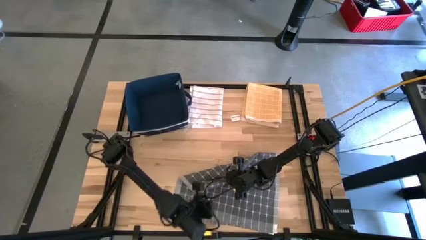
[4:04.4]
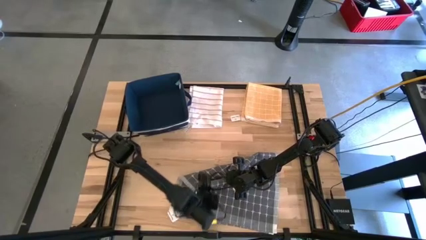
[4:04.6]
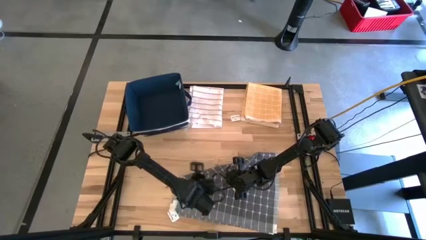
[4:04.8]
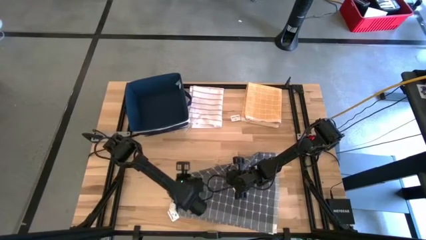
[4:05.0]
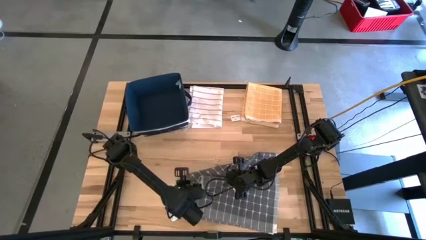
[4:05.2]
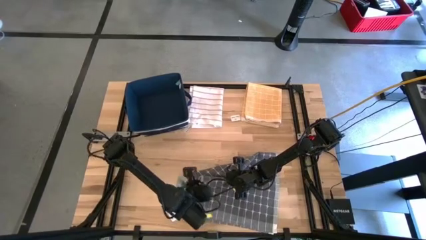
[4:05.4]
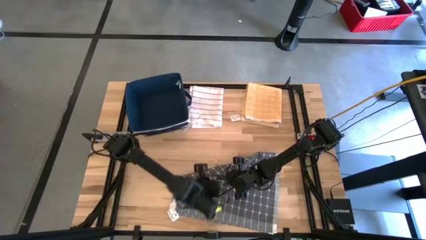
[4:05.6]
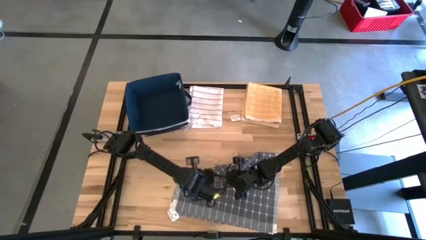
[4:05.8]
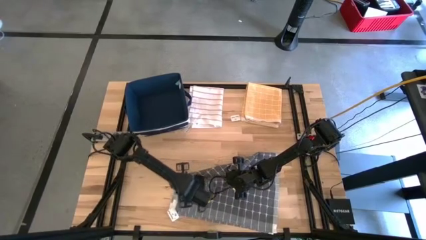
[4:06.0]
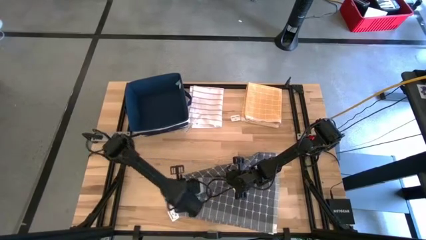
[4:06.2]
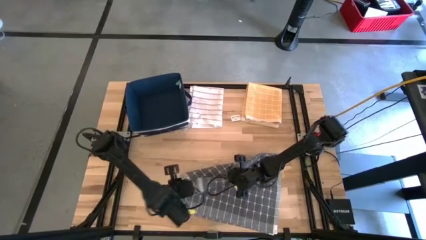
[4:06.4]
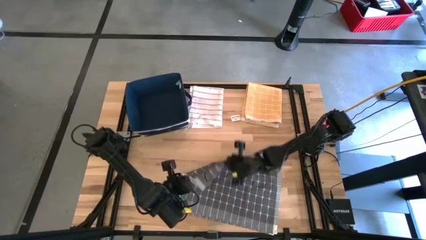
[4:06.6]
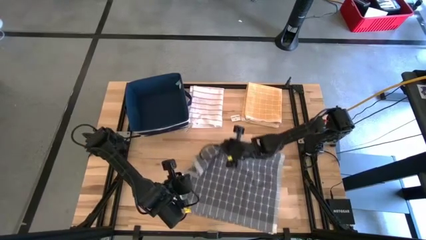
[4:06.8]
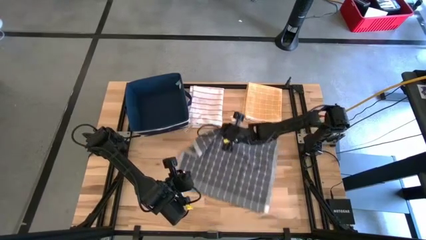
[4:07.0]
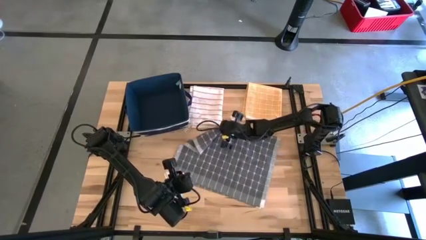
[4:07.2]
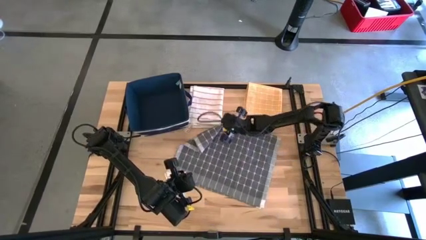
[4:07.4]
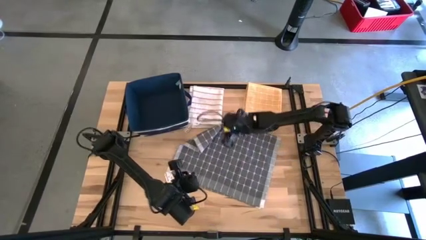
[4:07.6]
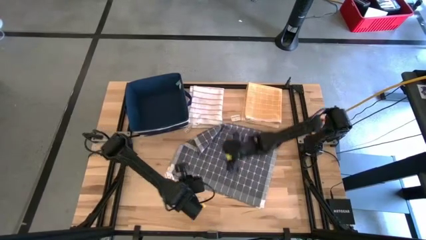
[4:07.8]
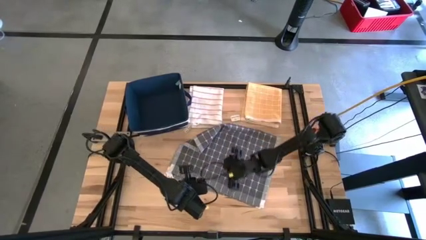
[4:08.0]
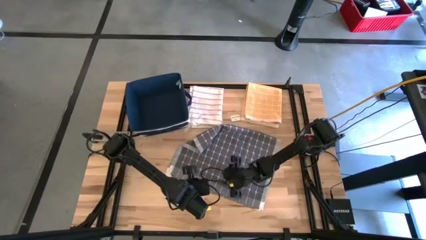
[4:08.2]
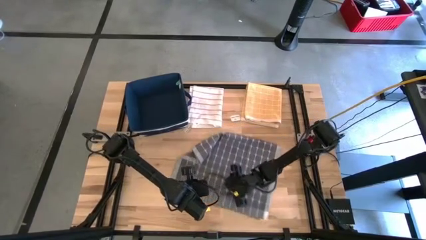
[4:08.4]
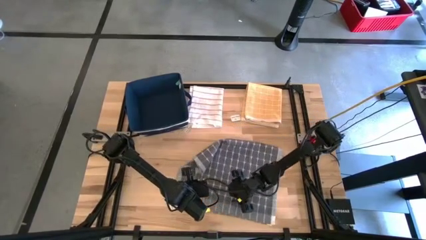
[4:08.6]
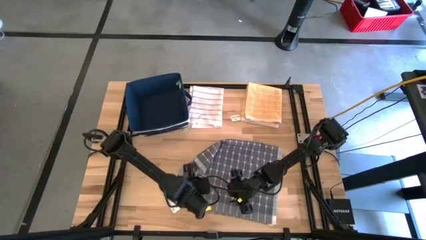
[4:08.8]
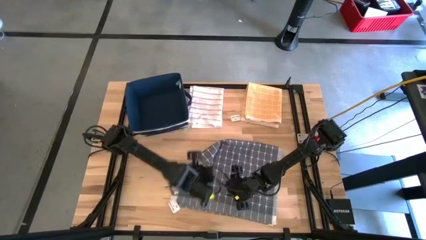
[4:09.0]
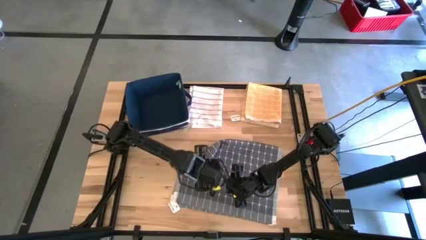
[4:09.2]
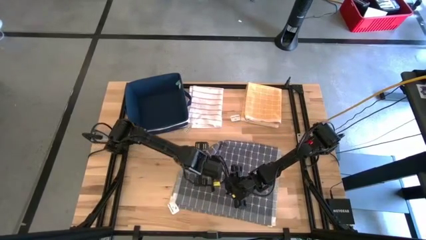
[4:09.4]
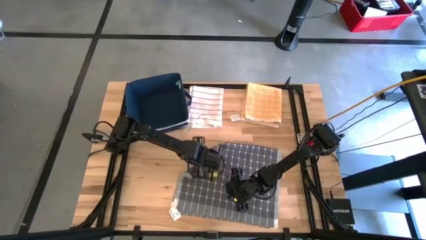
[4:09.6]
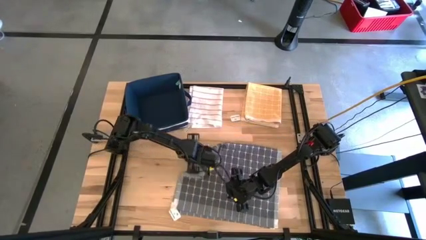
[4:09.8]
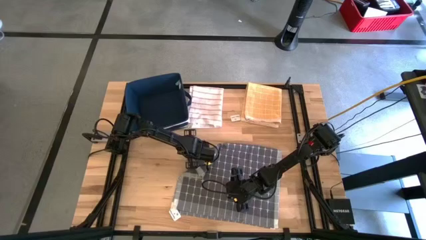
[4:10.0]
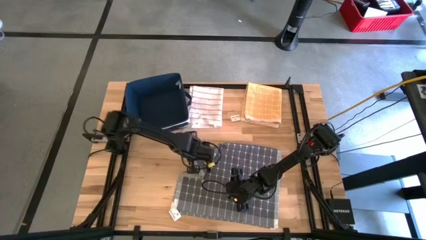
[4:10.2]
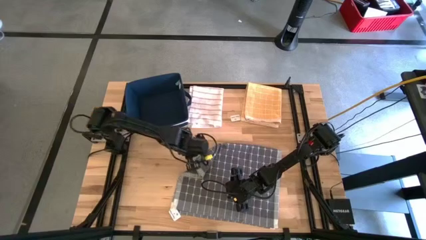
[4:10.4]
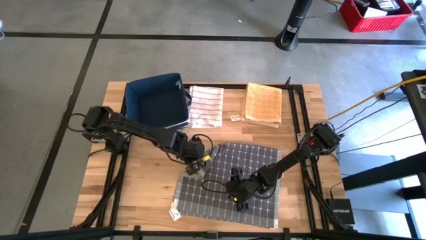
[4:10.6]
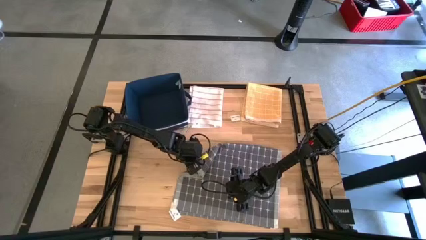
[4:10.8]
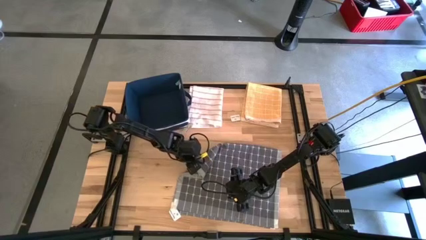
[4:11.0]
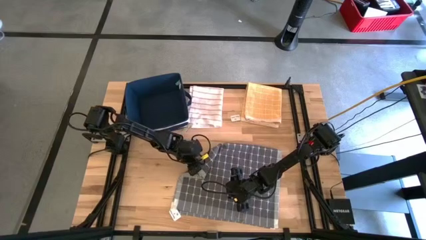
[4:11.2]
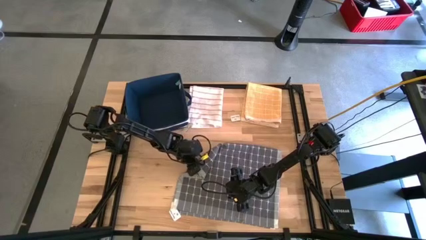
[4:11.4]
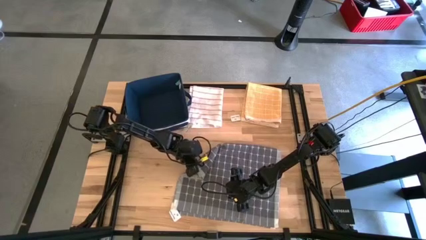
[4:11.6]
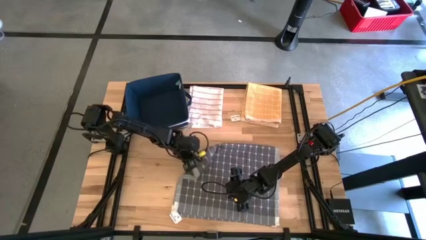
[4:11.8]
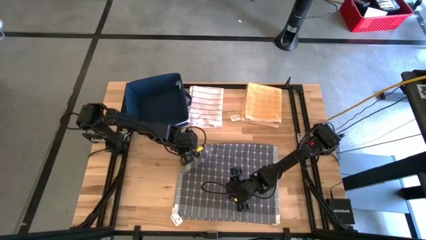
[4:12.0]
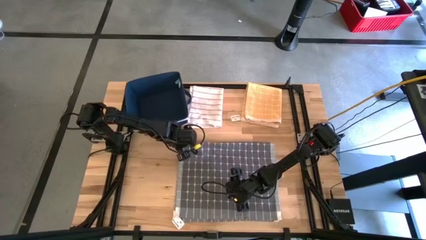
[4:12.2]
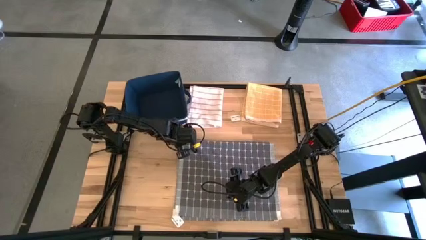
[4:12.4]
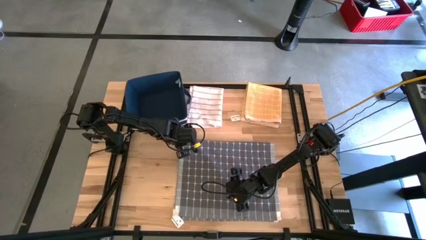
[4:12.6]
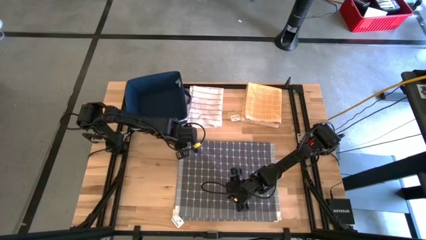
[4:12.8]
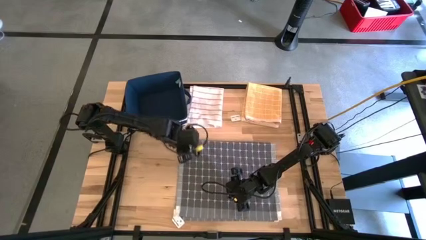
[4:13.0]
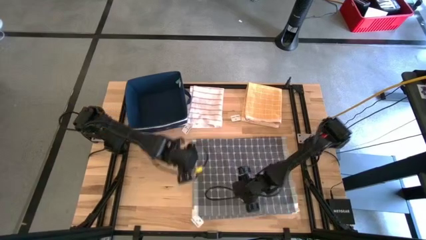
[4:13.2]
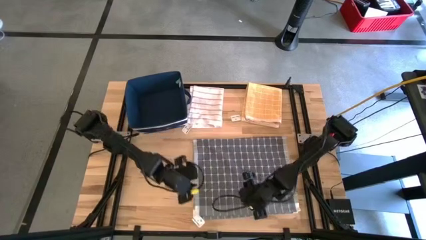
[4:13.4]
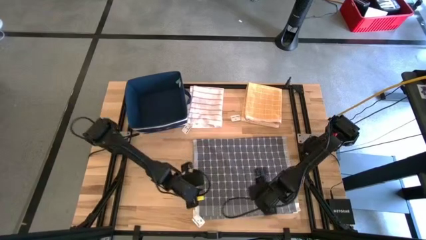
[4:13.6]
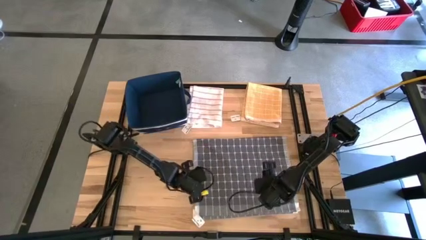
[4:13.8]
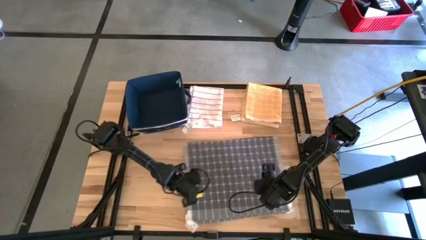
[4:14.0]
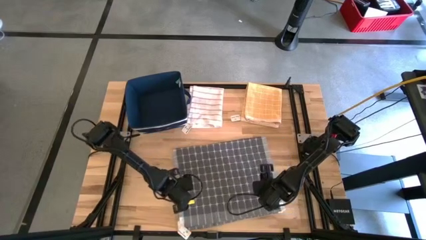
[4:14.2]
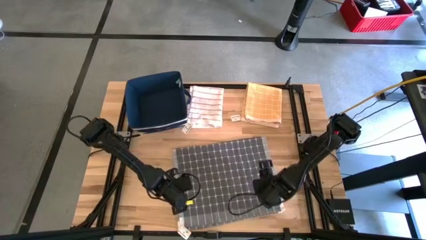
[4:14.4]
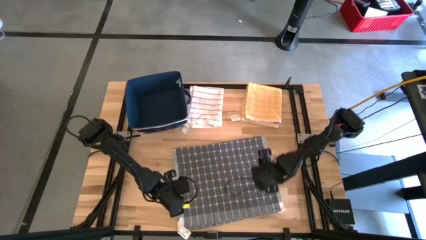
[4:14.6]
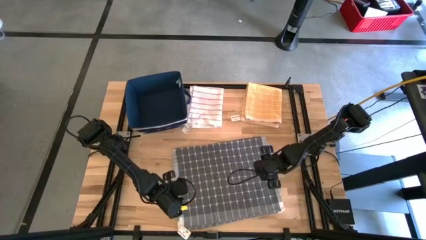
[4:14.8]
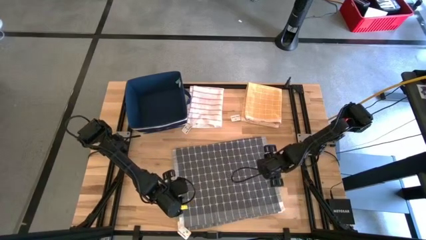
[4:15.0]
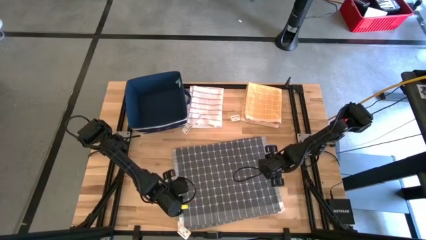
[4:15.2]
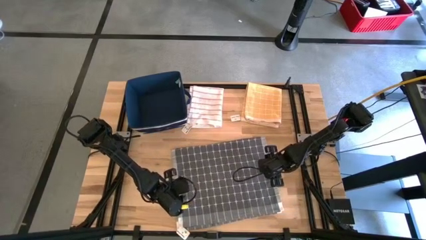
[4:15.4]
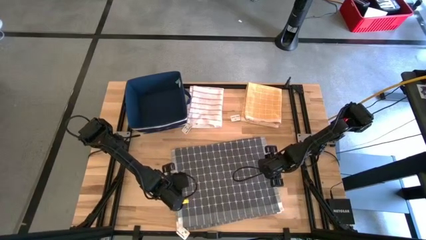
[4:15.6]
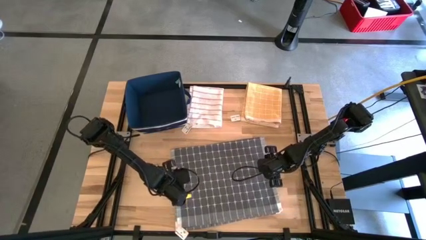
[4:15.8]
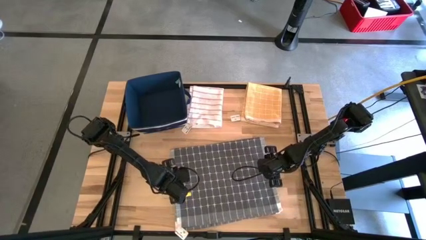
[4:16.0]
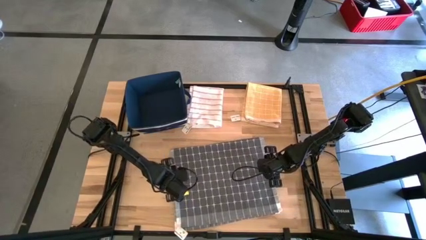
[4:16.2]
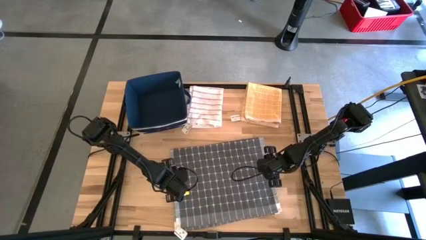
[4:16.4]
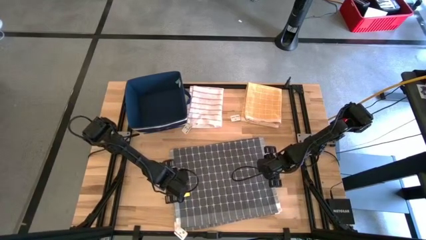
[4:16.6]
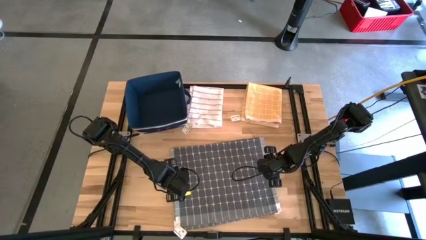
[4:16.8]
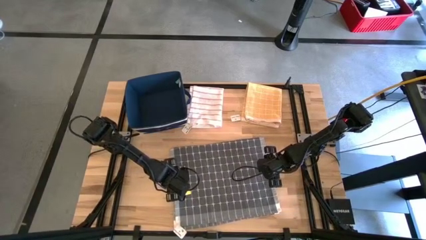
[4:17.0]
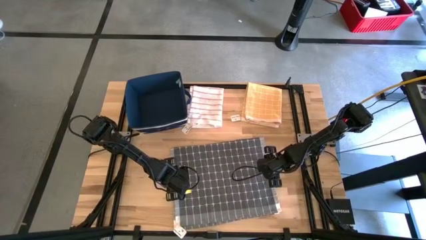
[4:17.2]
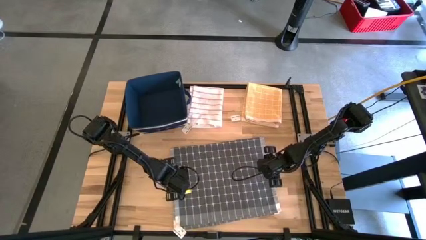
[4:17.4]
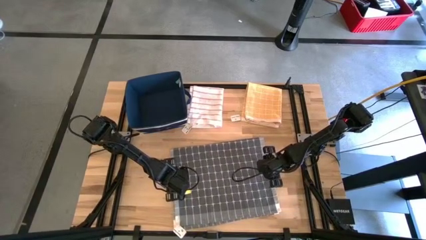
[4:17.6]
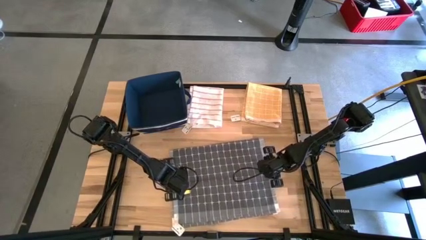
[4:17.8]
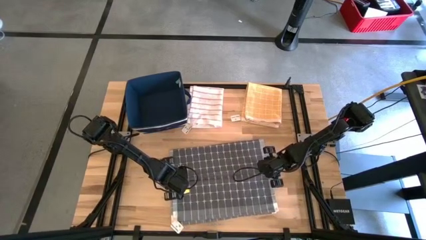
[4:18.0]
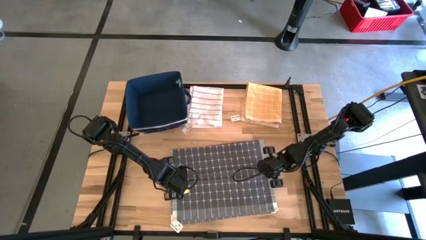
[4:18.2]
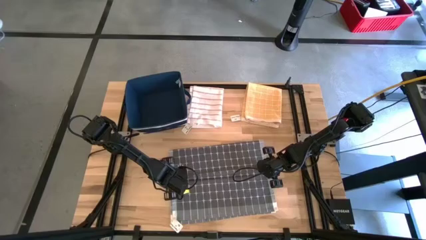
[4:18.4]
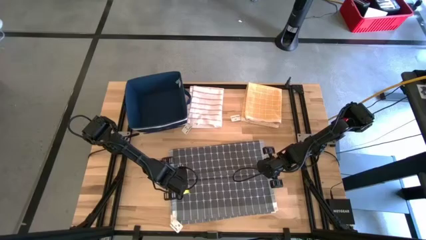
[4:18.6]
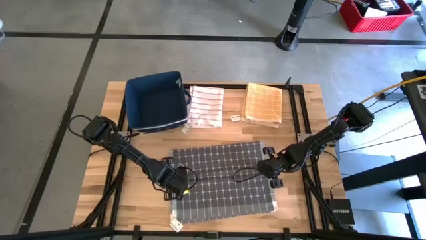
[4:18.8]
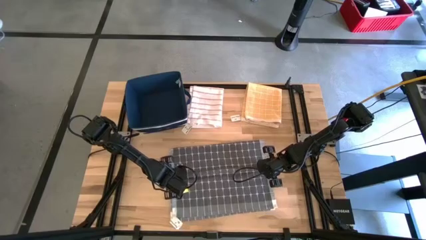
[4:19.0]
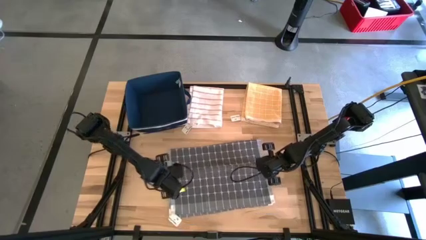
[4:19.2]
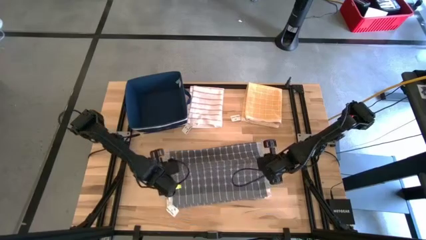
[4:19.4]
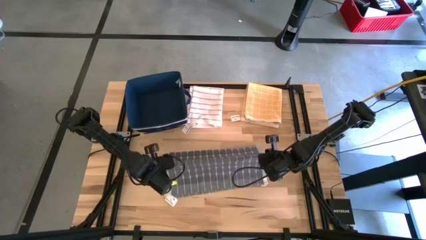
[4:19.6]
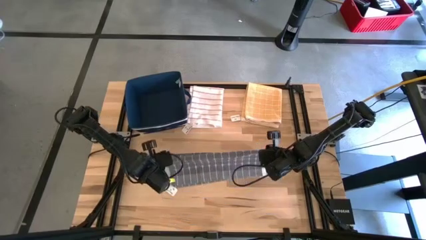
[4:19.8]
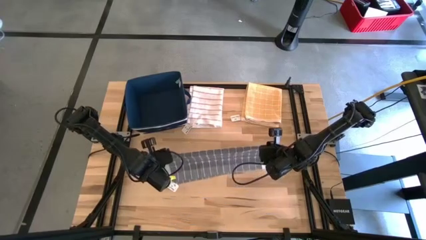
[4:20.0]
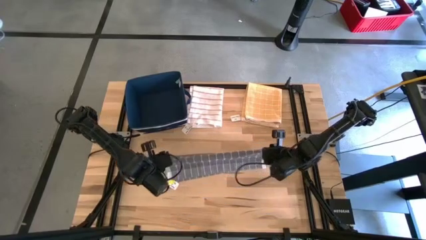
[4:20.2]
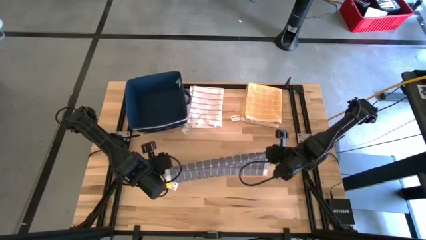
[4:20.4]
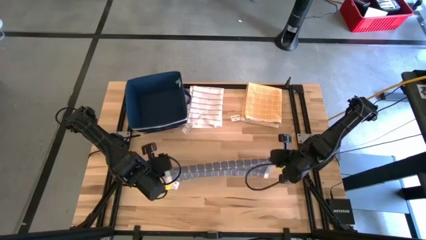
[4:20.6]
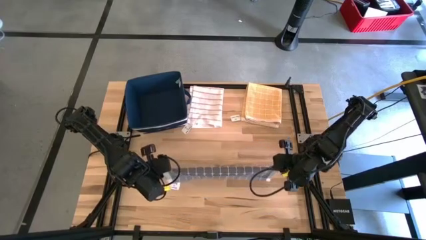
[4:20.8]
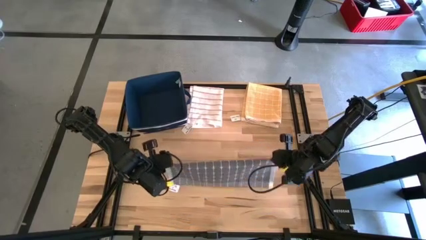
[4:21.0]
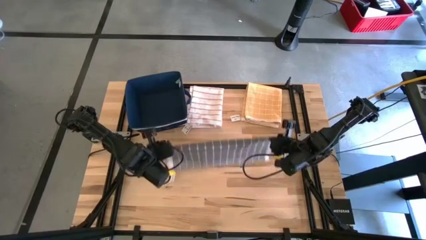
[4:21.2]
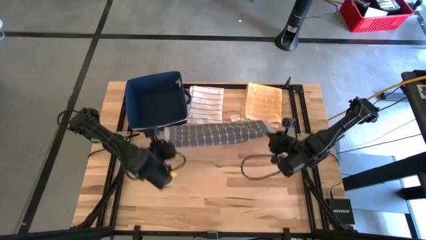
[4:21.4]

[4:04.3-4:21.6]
Task: Fold towel
Fold the gray towel
